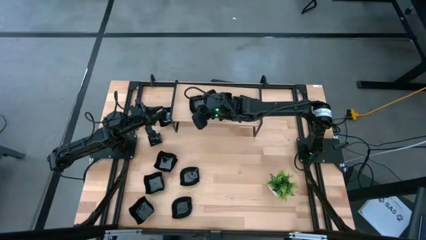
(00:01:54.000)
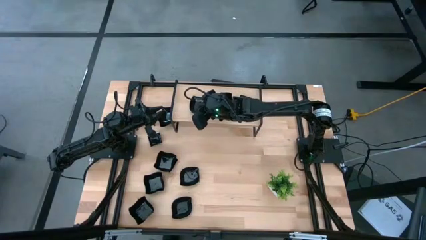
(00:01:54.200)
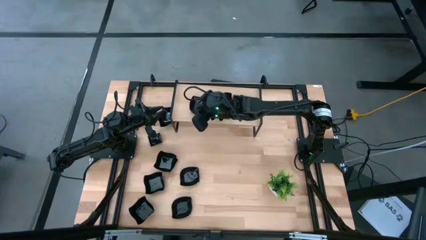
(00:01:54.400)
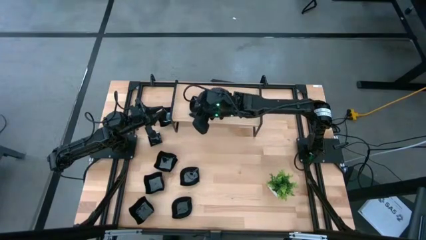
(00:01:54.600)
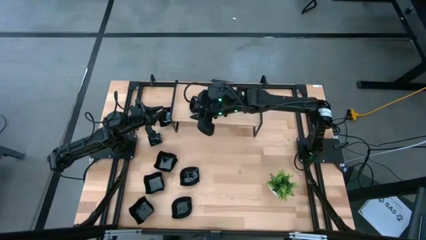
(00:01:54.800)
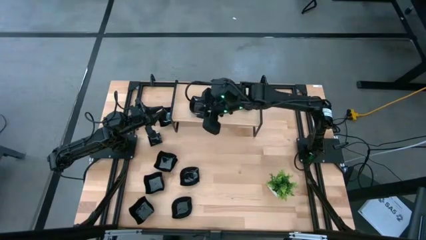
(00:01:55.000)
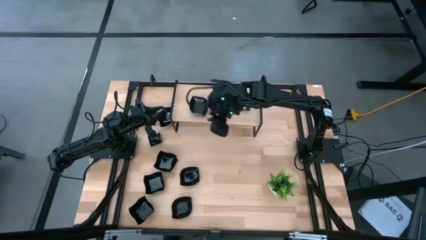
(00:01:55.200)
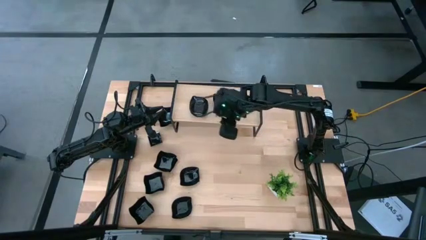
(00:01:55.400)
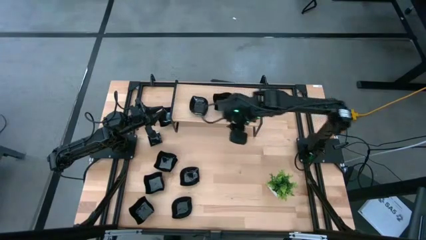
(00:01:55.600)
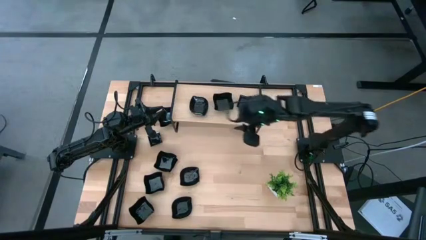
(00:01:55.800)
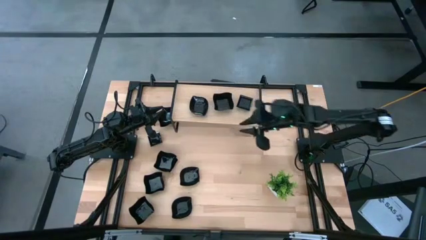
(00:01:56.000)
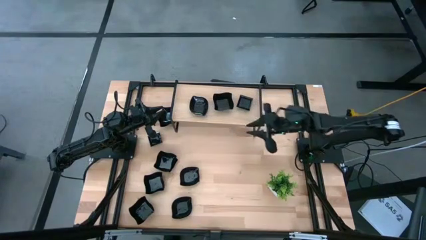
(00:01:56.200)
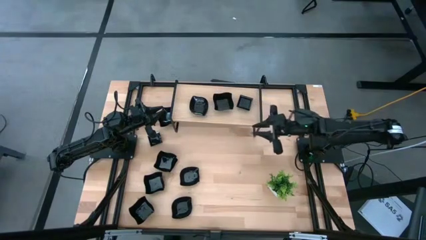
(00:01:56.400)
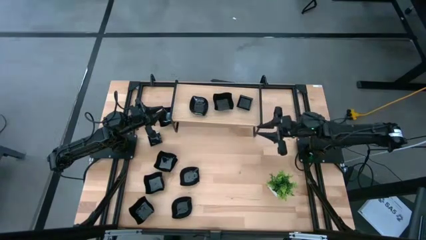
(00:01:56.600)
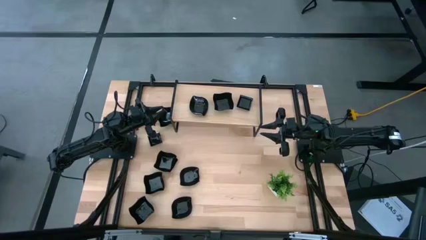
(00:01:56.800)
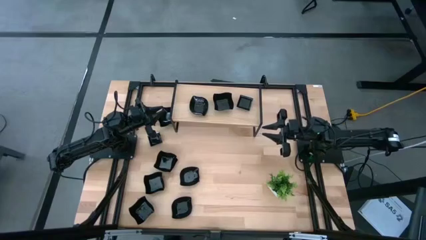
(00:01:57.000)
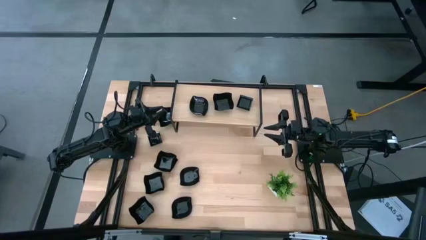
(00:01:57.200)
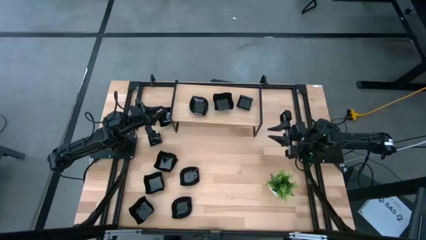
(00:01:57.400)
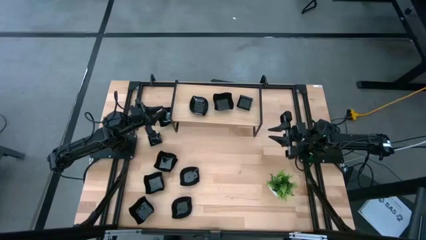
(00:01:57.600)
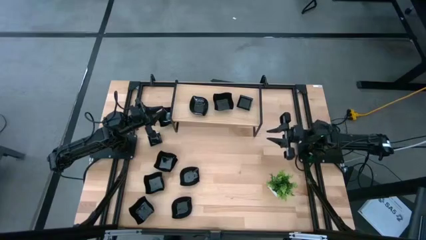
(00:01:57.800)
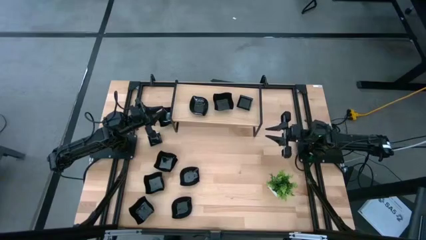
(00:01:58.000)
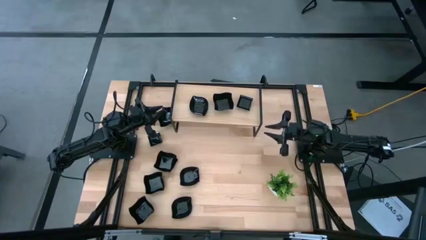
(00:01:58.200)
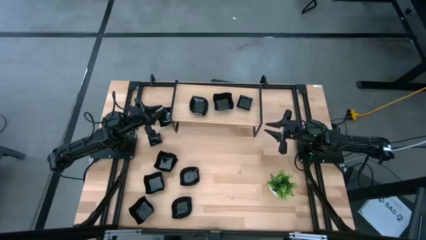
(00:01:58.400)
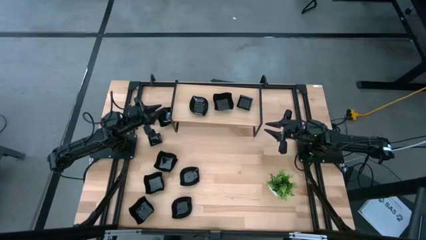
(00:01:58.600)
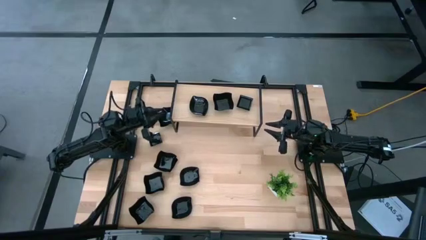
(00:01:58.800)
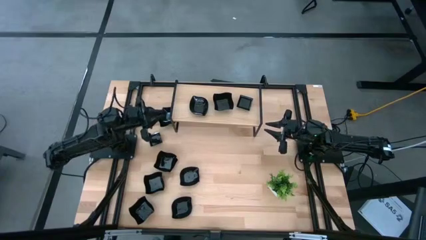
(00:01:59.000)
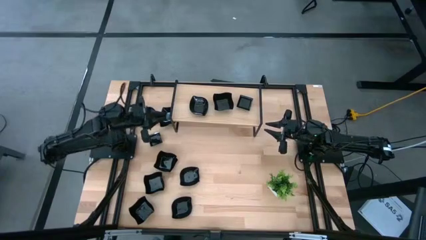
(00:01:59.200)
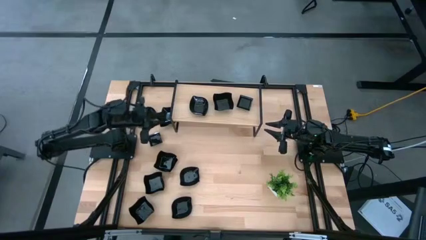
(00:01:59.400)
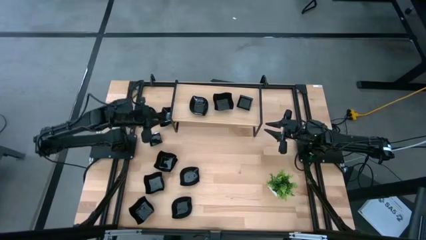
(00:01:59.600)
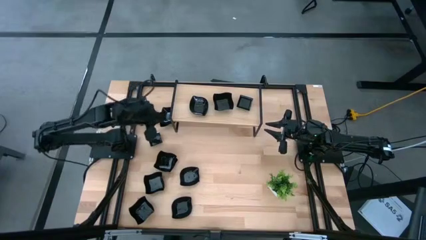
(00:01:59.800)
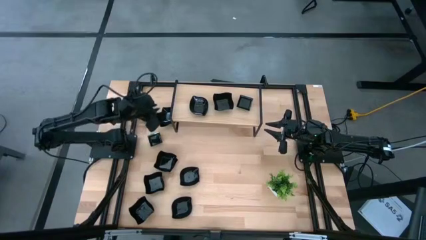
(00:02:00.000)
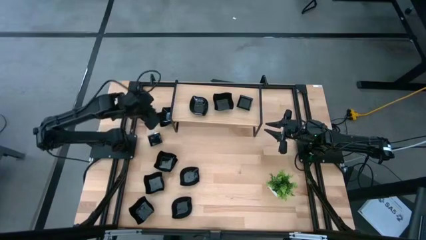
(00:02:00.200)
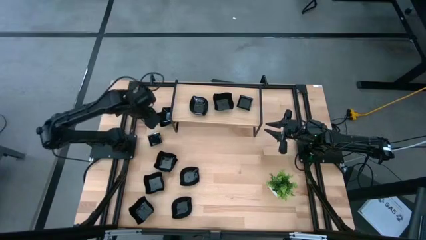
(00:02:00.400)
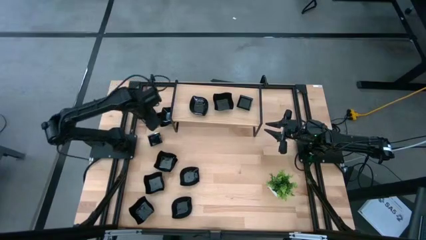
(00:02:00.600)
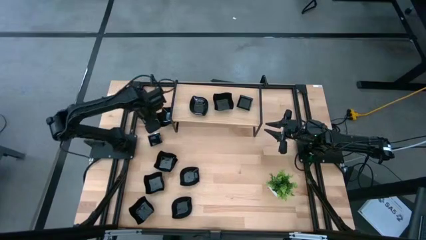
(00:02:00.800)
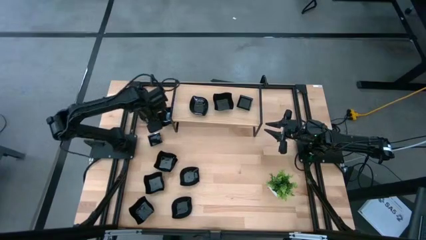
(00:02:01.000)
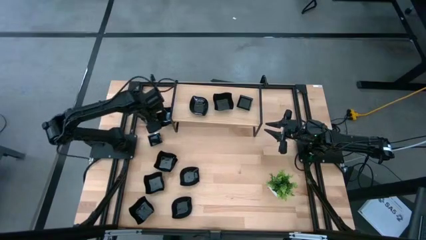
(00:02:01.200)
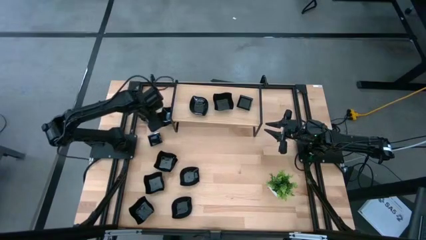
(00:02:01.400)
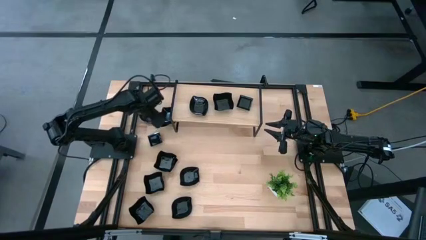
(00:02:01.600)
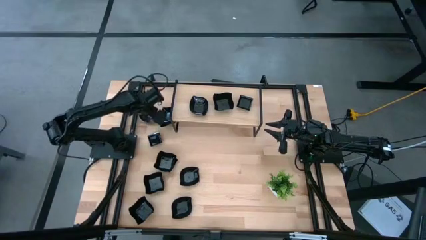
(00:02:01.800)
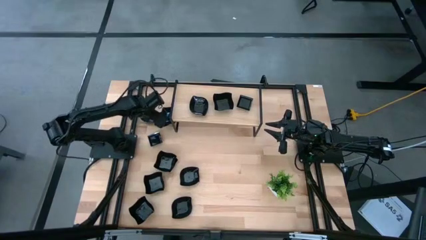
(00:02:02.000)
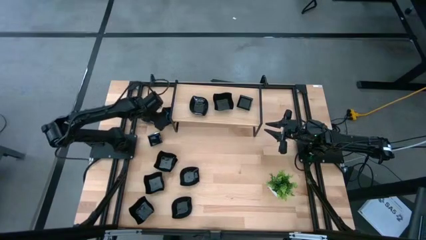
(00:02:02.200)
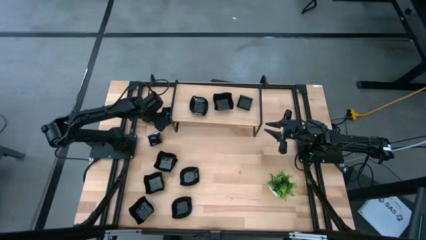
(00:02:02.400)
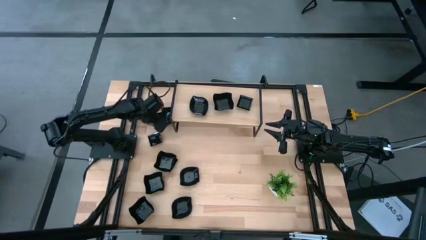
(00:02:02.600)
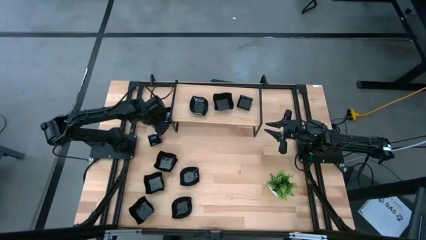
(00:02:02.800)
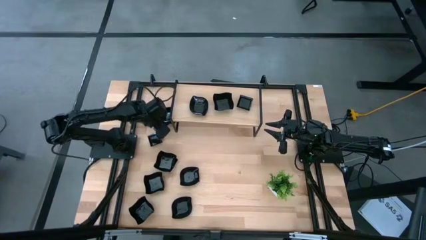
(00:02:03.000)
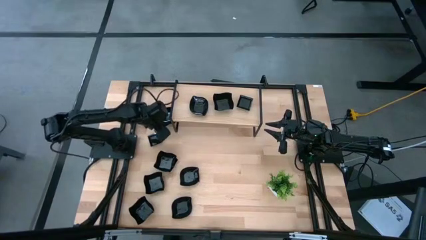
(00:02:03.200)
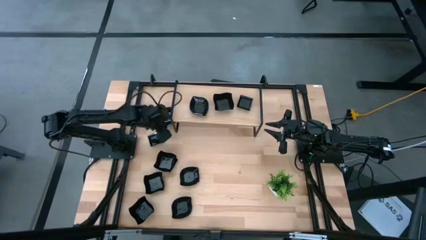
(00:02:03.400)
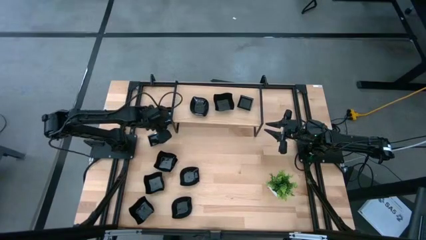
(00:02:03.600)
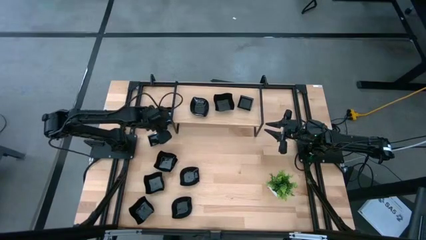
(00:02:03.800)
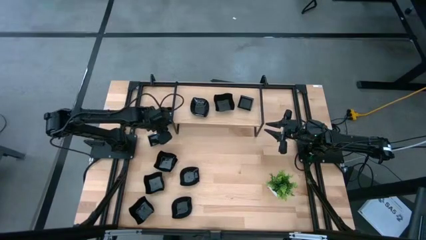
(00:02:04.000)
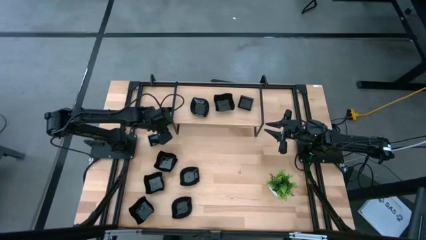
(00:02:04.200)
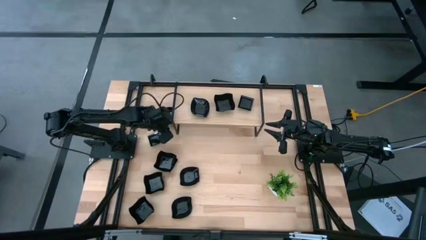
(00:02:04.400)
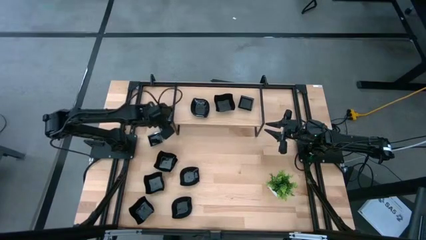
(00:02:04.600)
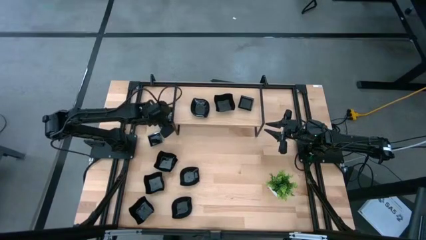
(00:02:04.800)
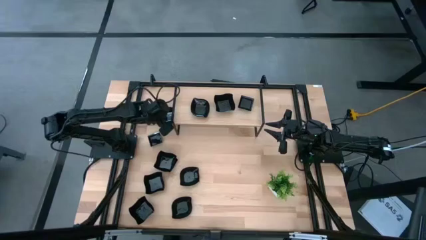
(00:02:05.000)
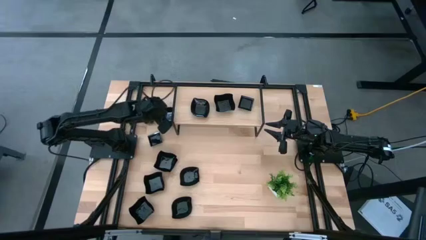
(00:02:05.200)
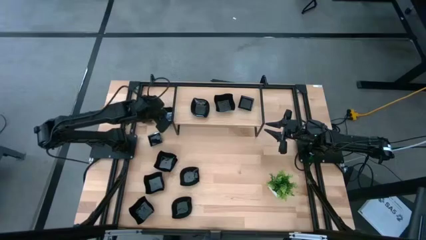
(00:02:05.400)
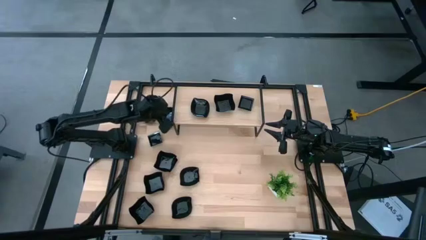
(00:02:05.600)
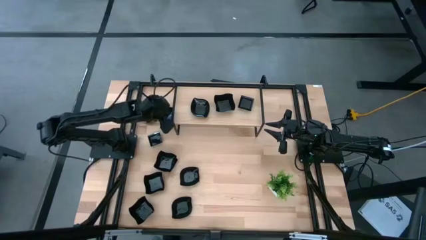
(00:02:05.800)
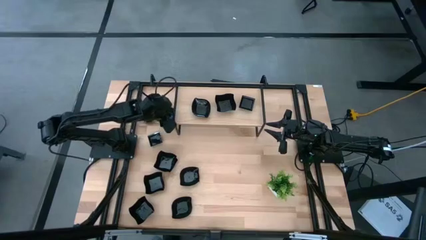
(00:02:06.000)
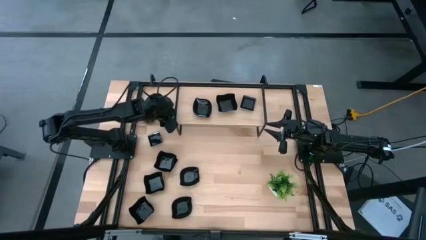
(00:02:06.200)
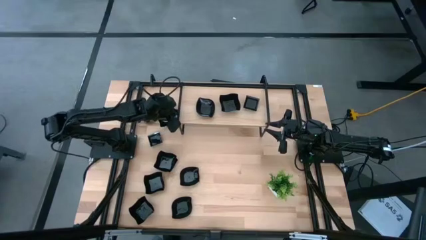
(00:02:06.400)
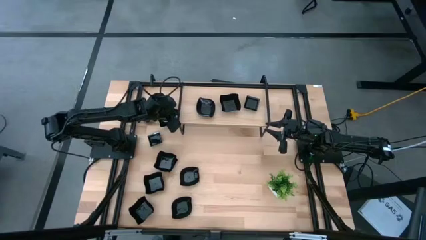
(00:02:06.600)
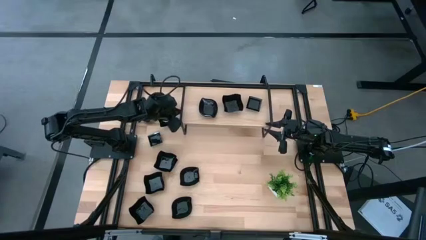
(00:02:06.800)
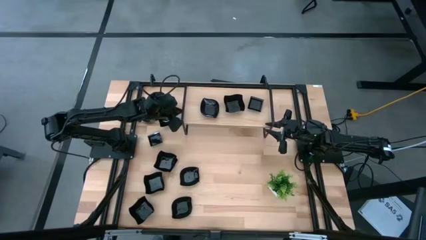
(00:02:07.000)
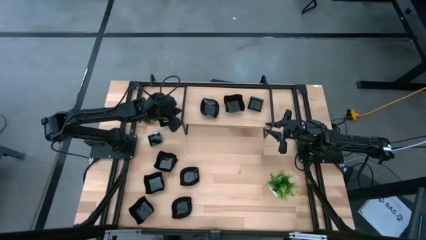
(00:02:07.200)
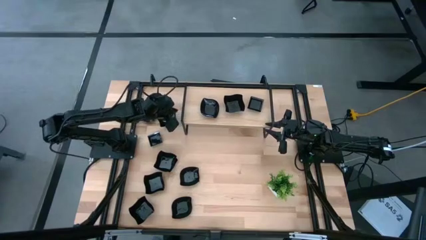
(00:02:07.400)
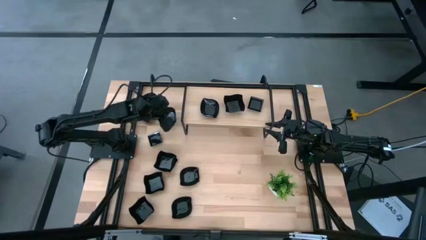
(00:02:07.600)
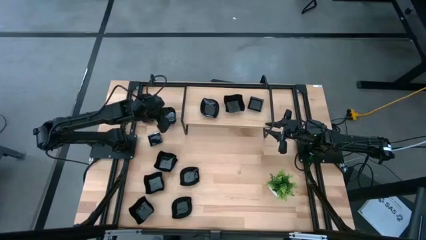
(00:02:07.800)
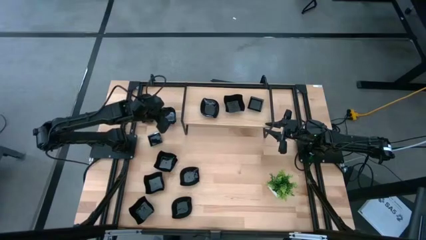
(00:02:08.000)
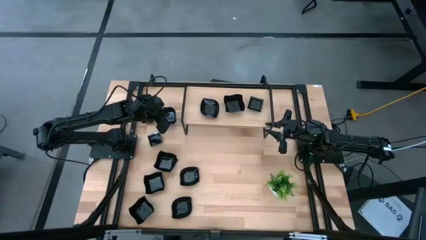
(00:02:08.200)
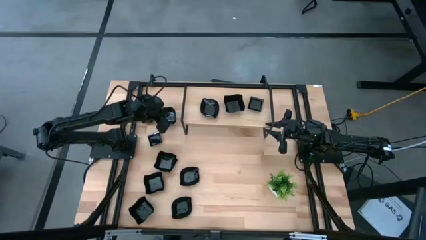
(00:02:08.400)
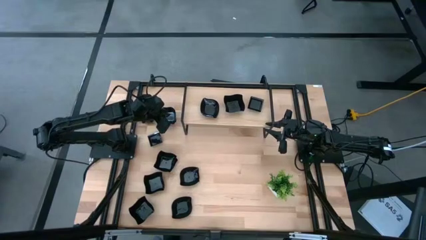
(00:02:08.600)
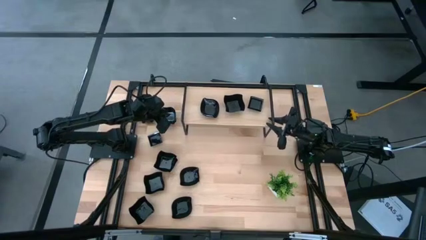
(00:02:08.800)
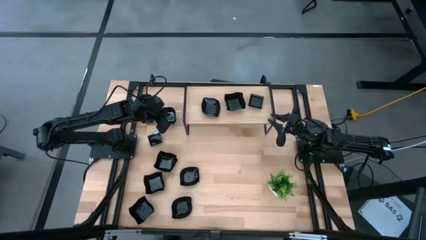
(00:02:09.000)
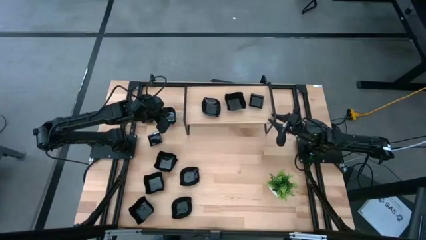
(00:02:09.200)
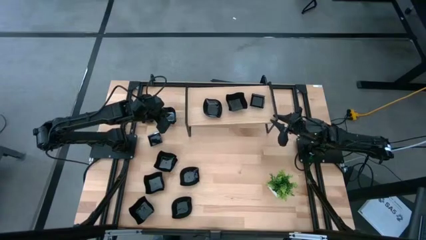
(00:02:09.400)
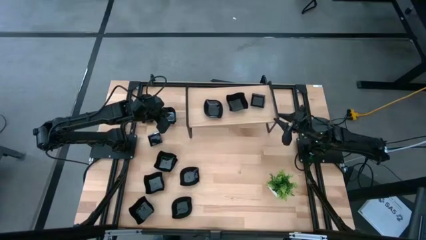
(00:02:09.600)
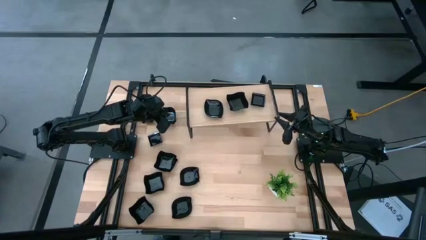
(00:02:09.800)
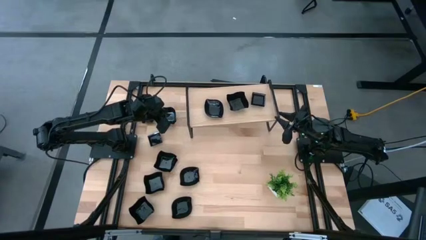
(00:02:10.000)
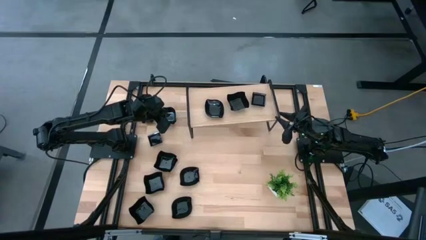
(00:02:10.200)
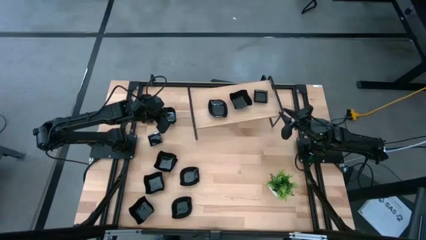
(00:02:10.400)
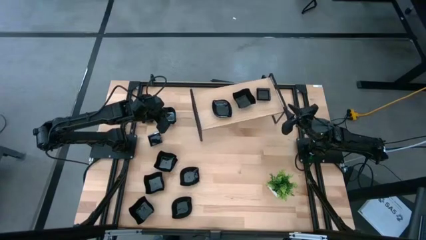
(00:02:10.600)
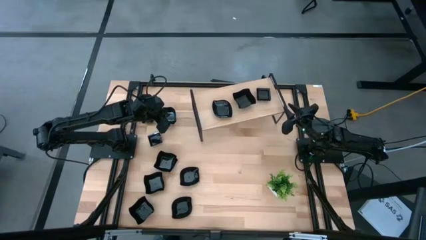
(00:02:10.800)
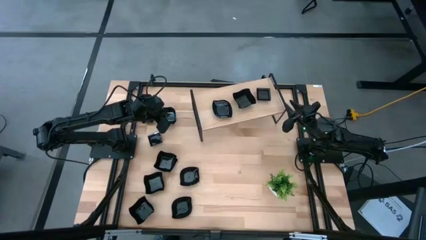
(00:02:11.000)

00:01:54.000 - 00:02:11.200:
Task: Pick & Place Mini shaped plates
Adjust the shelf
